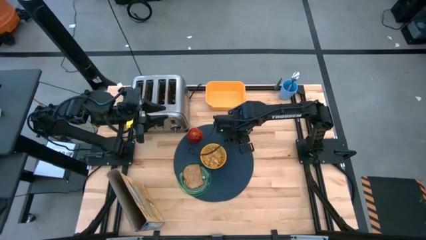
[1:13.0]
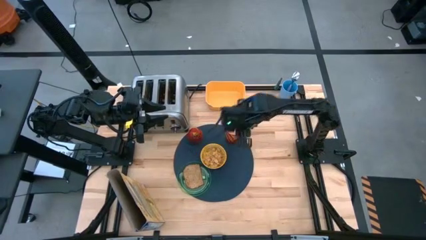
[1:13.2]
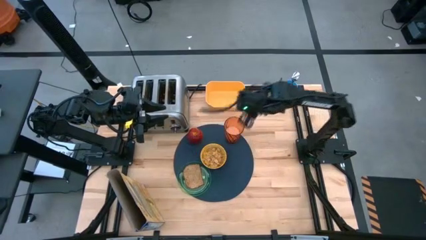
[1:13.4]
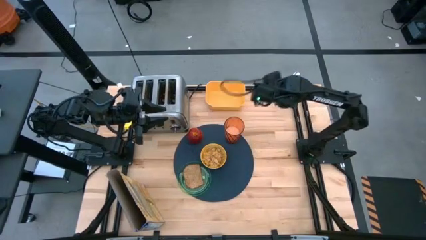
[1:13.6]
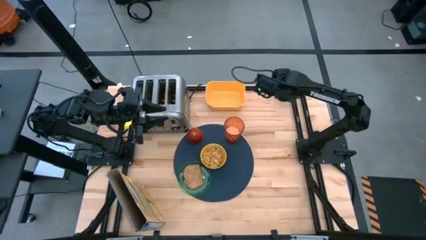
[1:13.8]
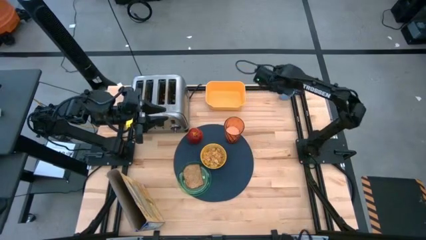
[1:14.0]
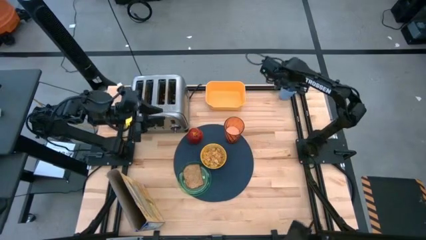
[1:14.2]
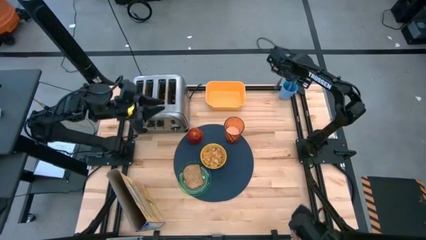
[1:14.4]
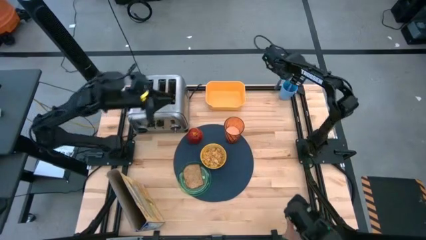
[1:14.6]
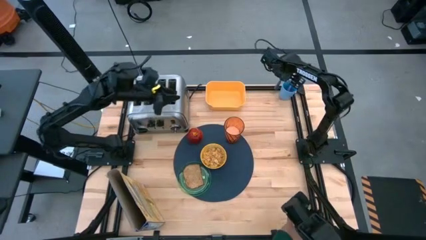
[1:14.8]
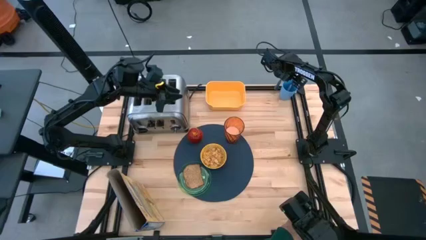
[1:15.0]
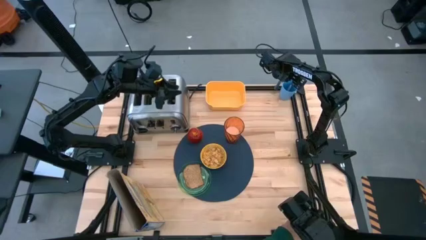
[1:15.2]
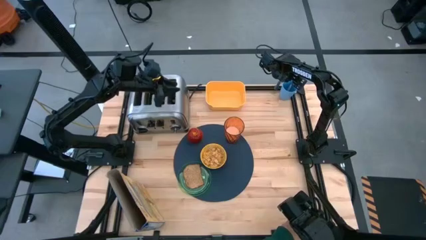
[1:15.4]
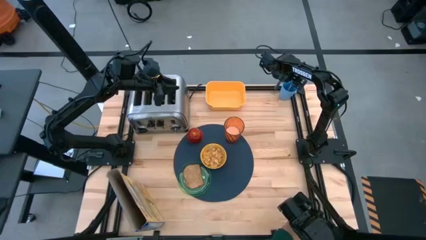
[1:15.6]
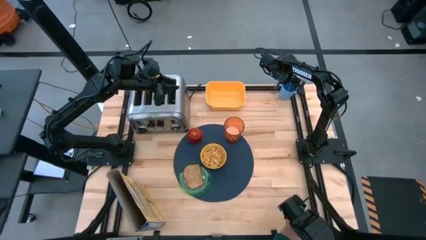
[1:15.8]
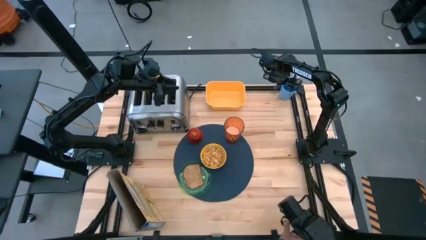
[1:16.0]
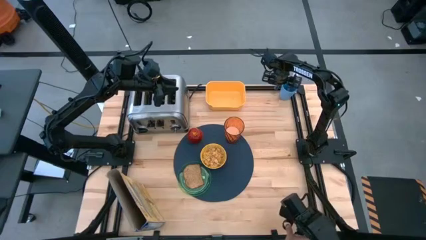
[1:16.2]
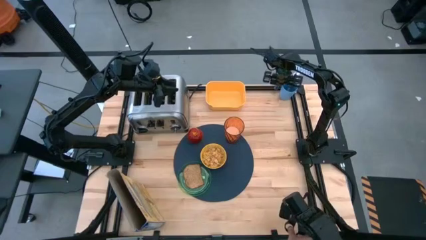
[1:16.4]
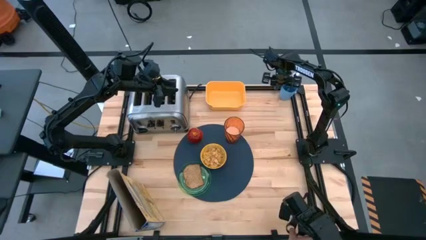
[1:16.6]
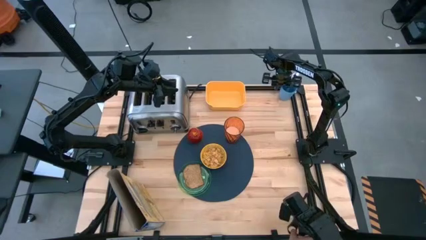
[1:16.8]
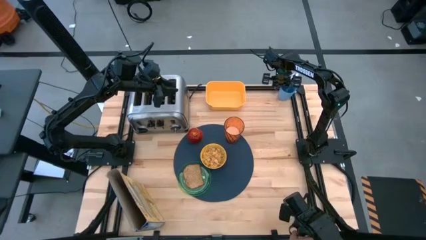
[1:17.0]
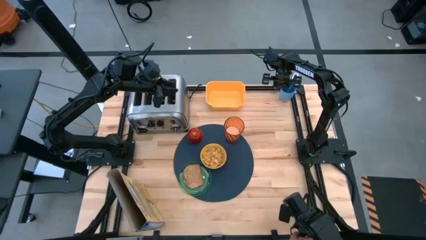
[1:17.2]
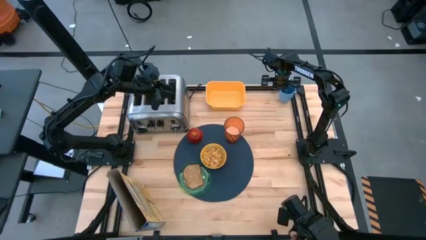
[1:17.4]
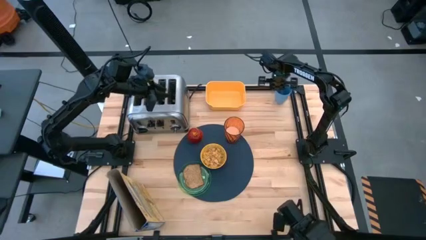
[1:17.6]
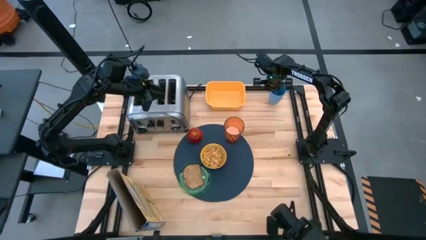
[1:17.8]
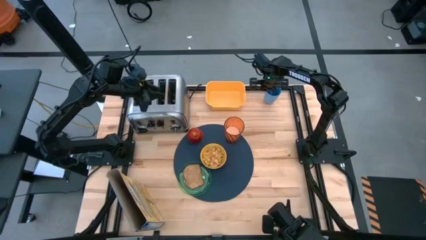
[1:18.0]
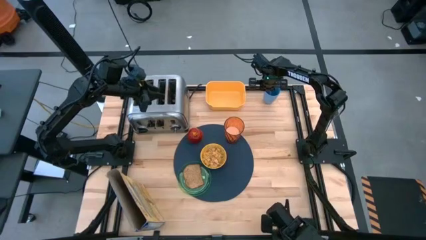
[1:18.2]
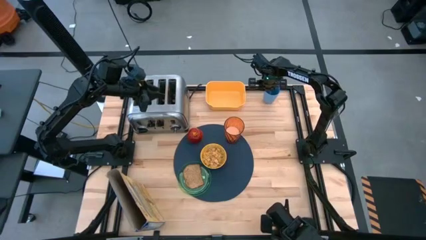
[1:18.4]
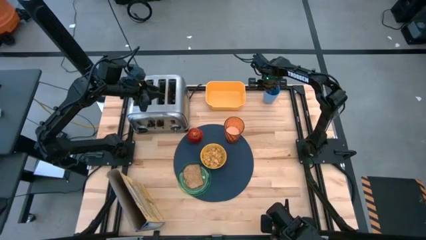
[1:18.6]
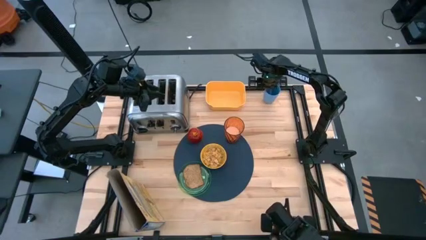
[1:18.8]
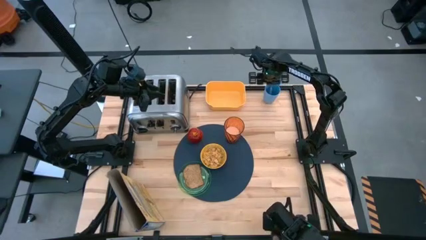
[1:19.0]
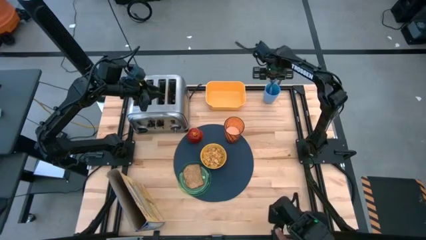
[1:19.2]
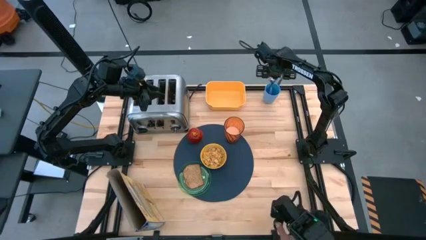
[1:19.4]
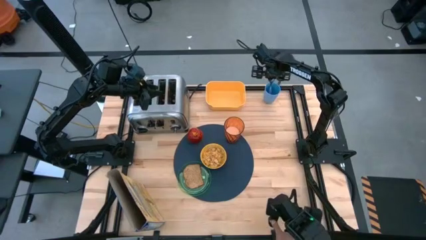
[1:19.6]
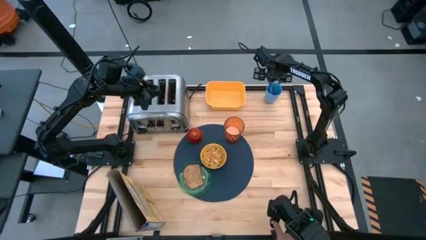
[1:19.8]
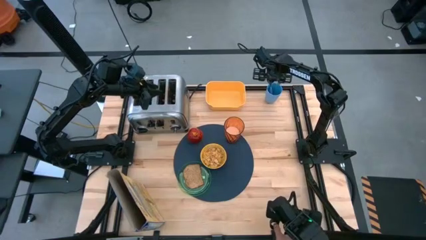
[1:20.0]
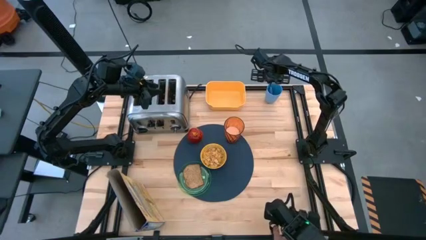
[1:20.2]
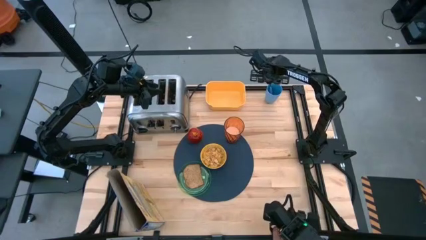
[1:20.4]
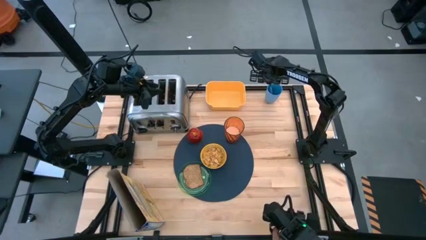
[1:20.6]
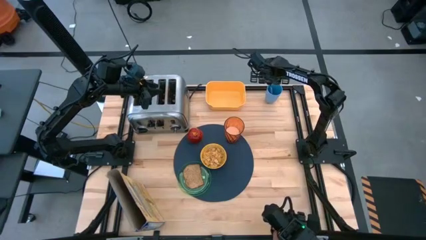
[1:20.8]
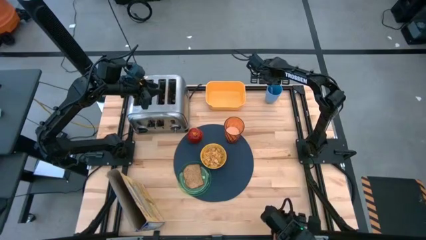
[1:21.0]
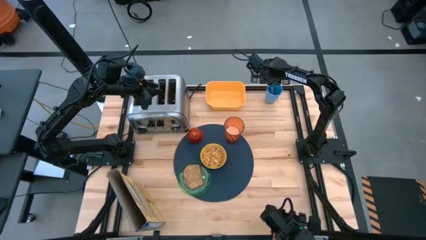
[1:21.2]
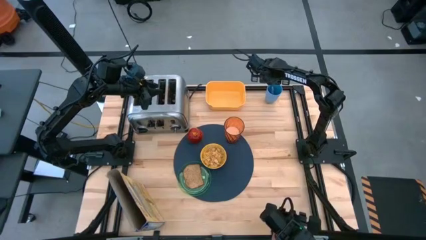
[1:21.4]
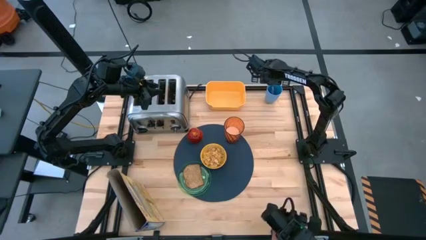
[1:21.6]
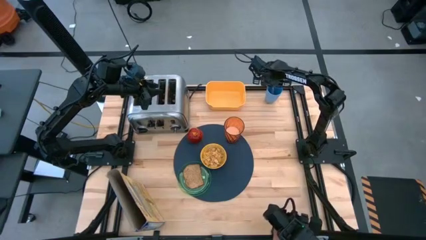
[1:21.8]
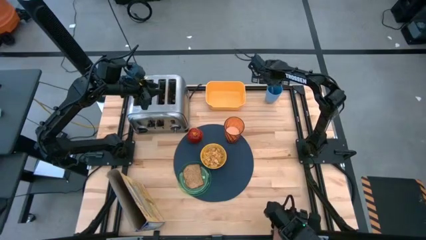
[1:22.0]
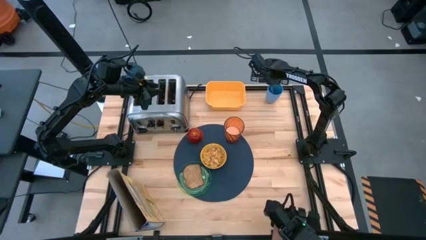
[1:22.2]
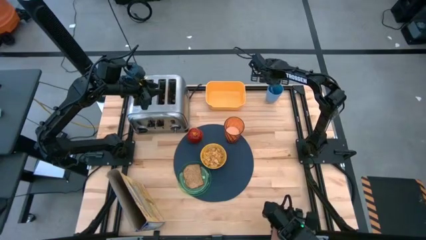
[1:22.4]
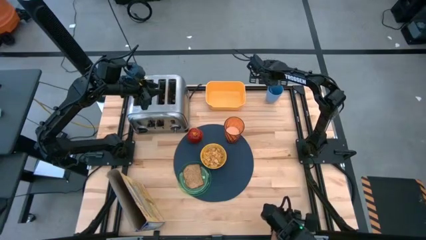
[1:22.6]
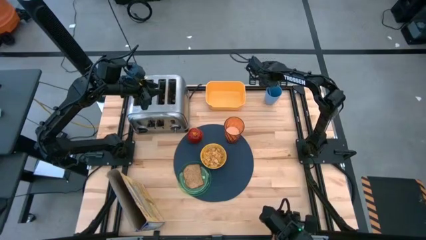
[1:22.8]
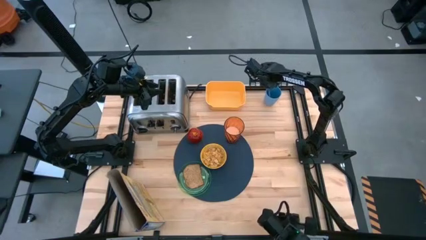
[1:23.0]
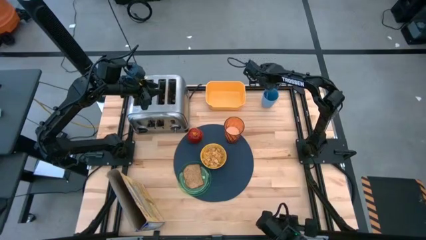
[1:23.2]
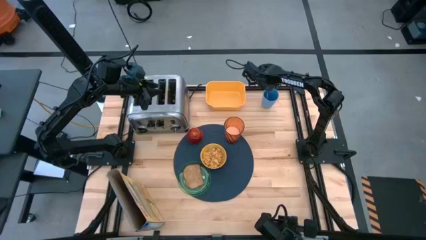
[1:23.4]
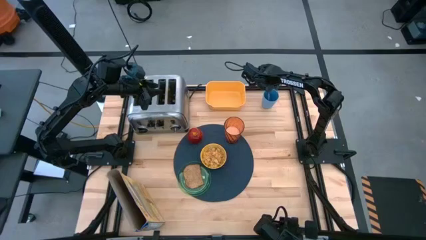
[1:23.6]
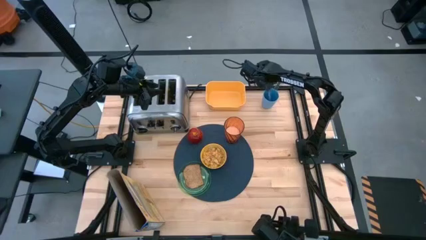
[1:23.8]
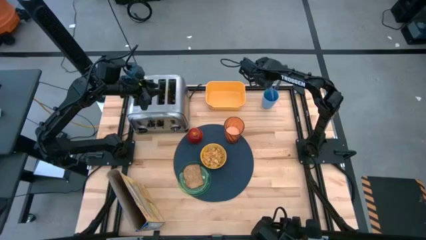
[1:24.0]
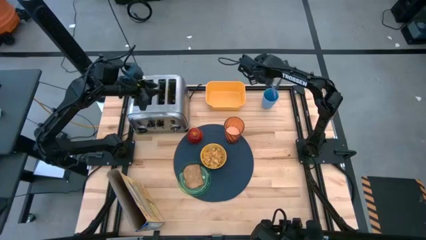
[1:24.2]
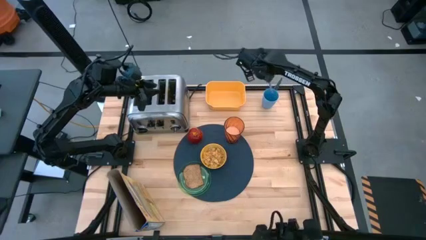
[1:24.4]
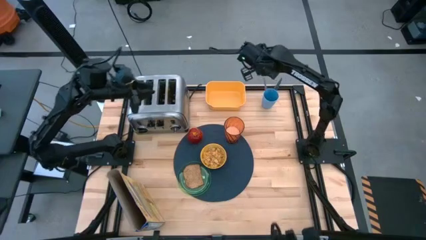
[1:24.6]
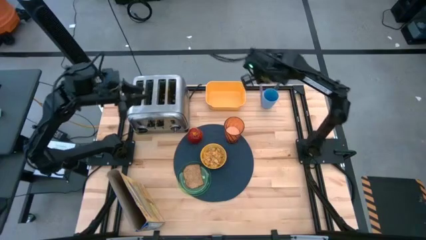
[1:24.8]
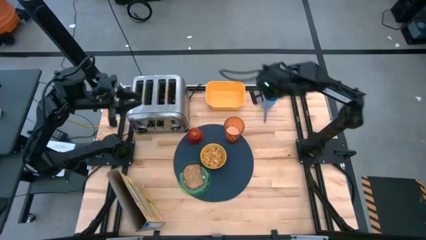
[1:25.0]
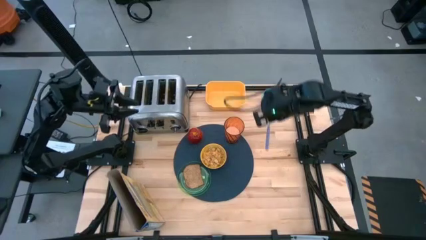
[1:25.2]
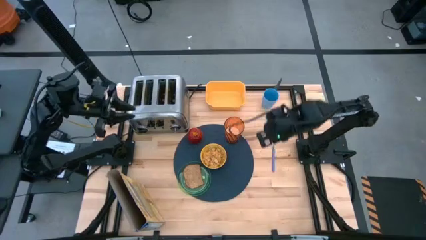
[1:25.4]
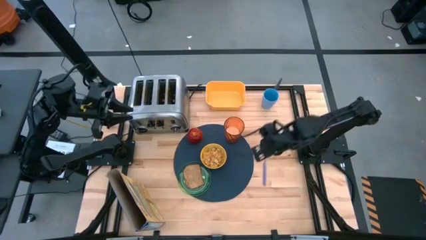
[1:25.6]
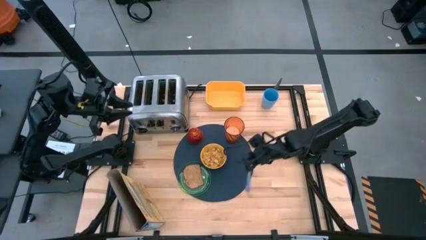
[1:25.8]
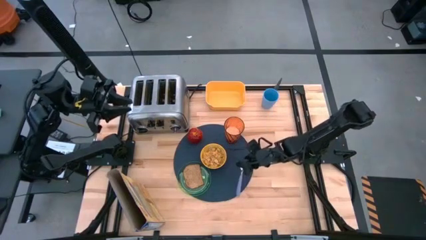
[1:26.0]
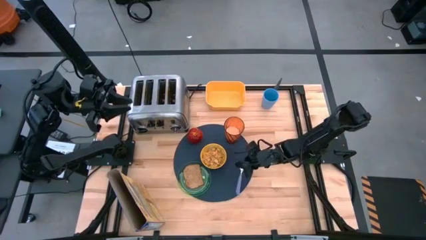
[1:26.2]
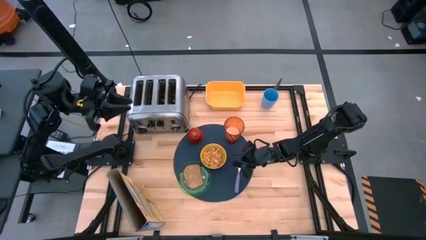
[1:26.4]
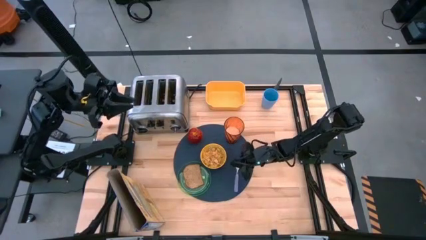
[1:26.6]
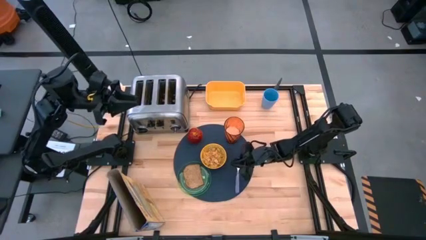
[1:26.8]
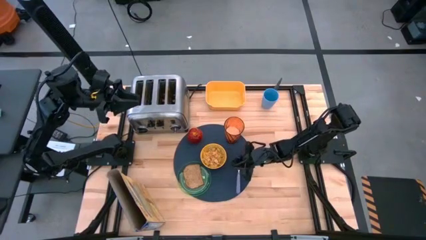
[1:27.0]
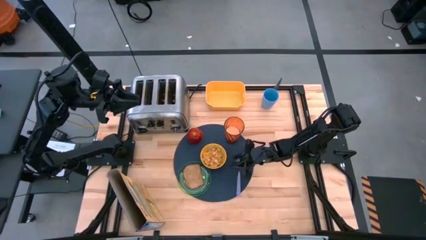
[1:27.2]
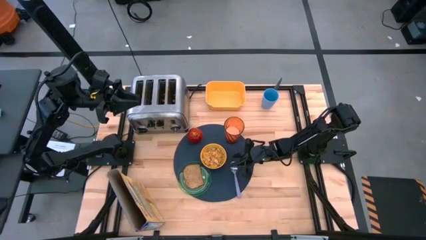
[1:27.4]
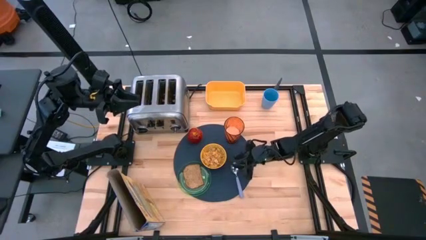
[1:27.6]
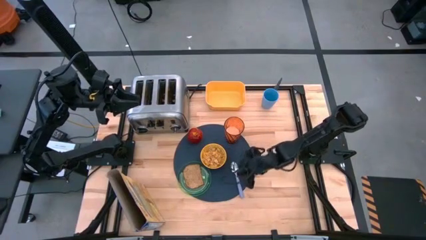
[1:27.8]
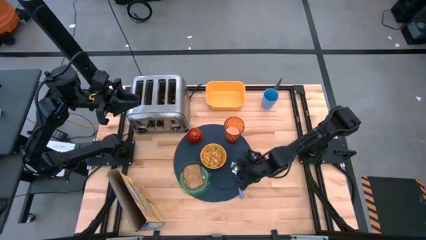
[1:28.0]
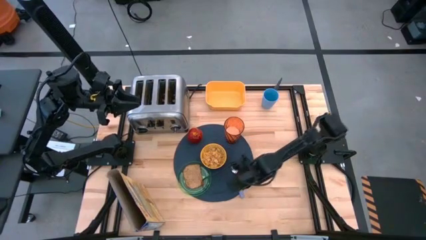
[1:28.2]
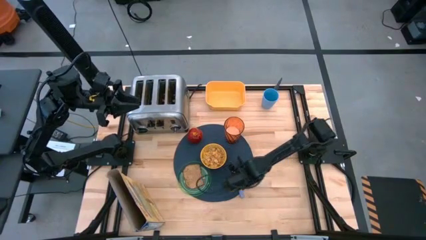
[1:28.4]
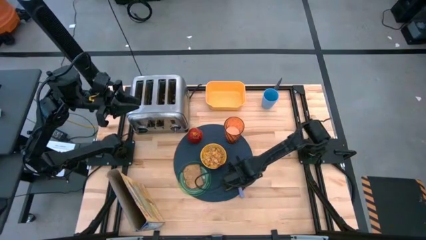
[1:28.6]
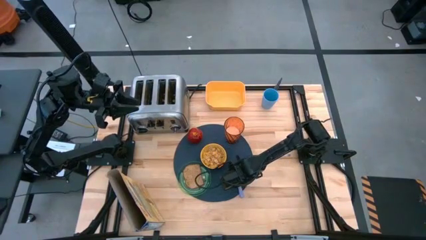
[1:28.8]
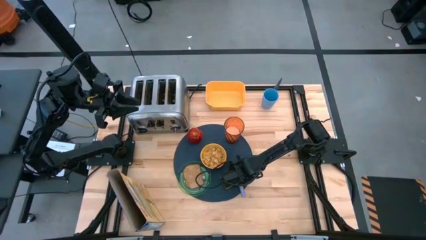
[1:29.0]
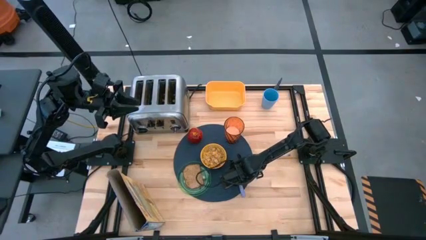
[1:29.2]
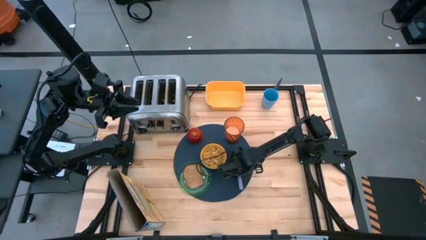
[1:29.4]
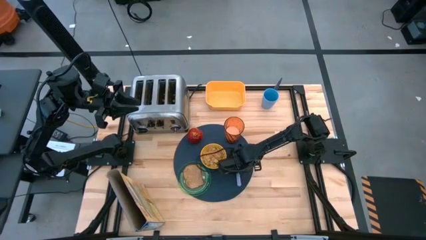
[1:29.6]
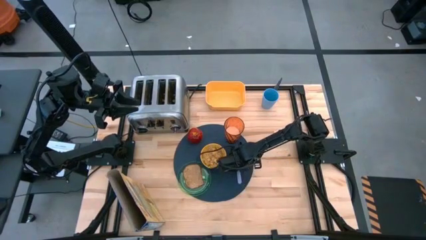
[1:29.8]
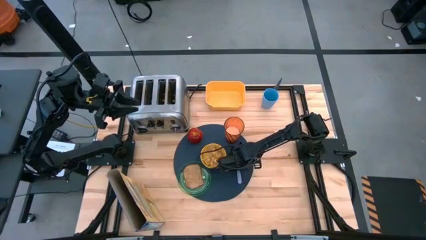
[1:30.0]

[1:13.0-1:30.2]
Task: Arrange a breakfast setting
Put the purple spoon on the blue table mat
